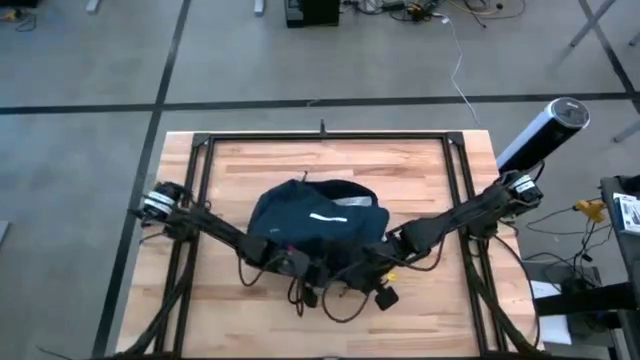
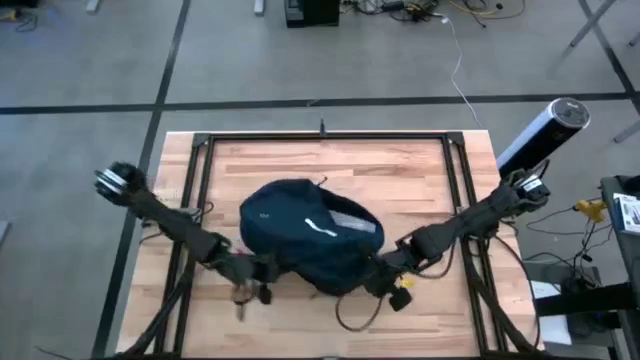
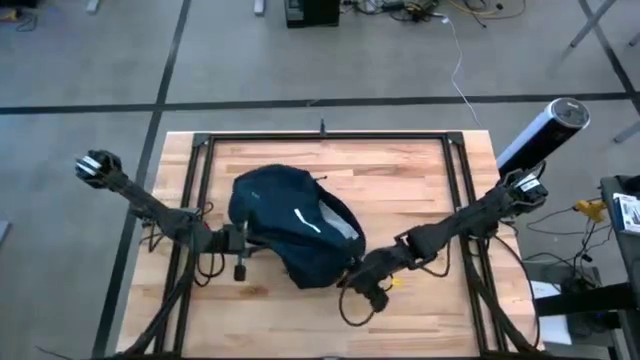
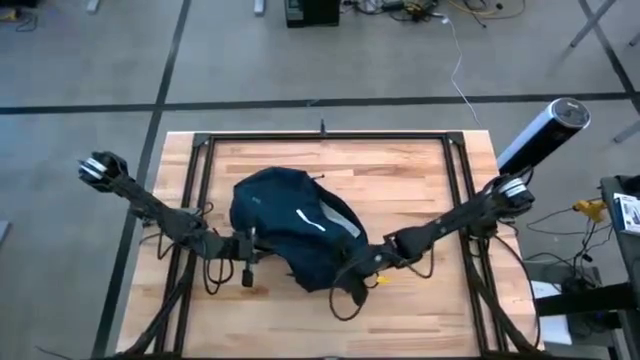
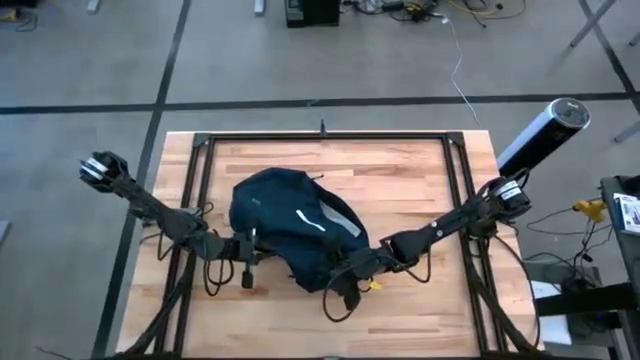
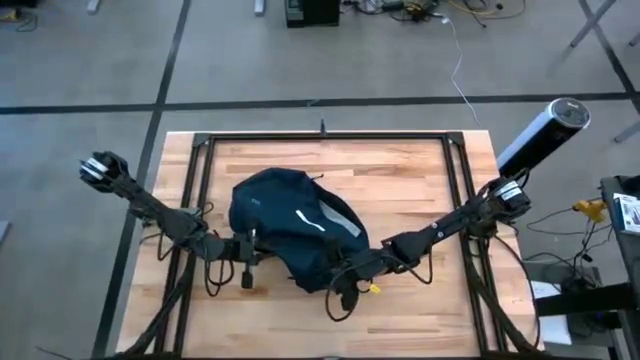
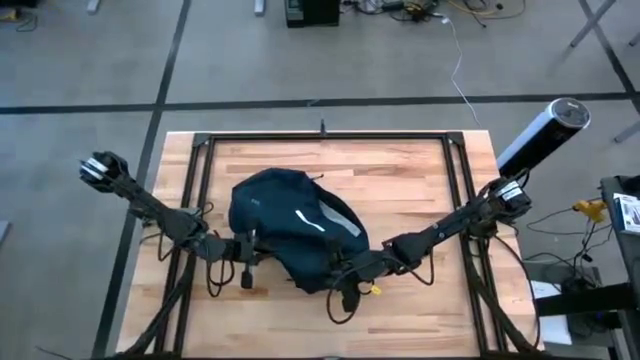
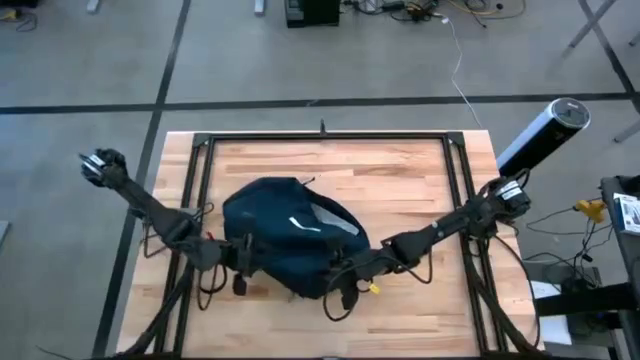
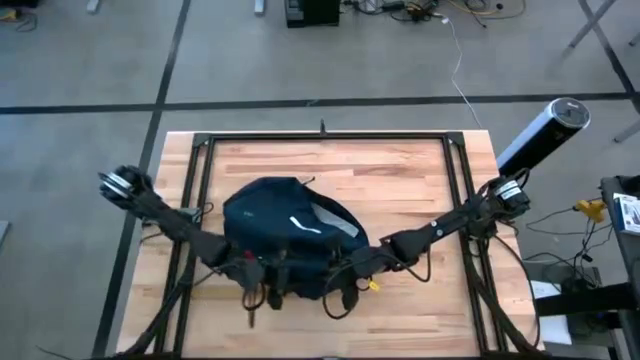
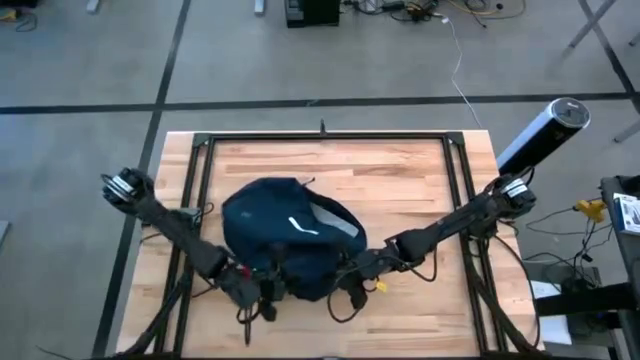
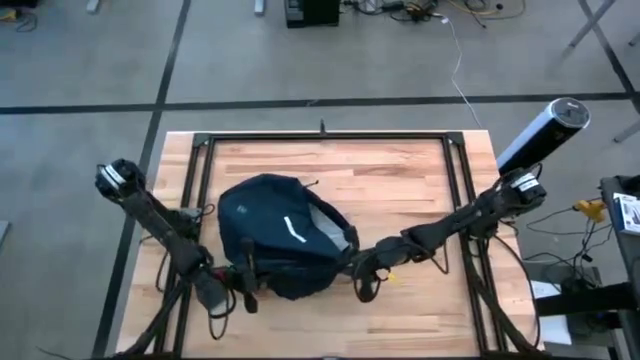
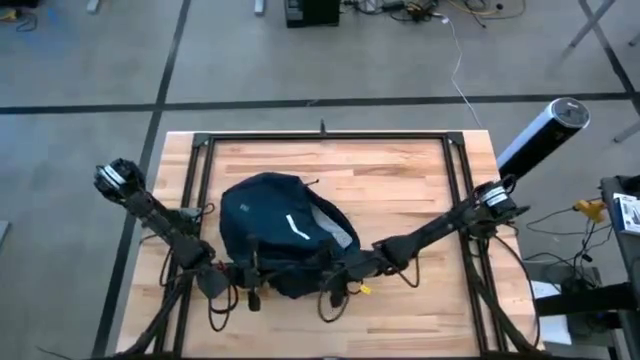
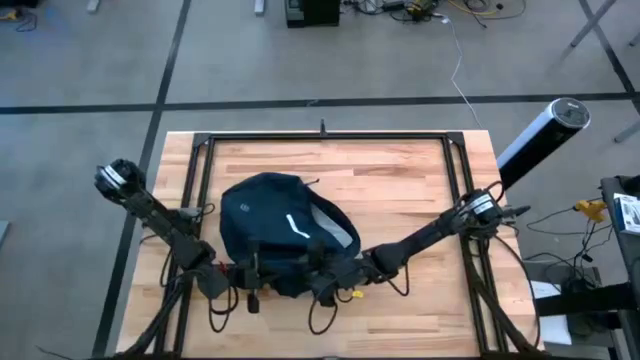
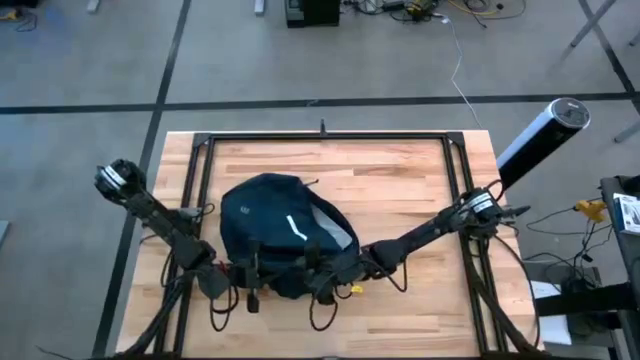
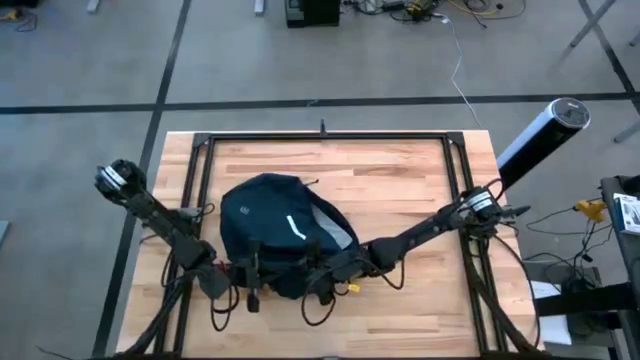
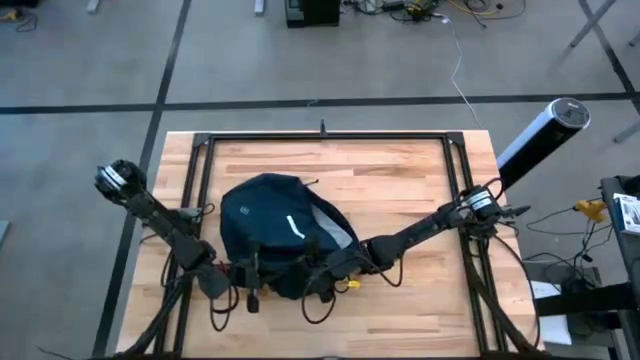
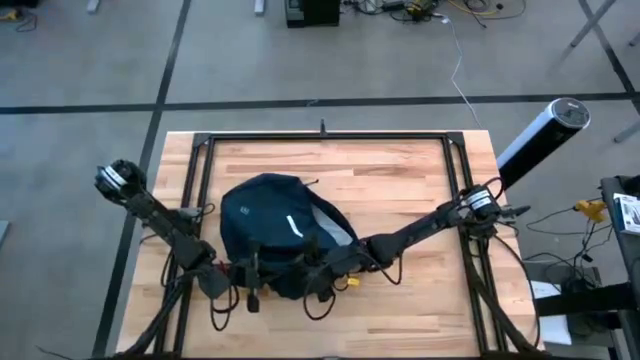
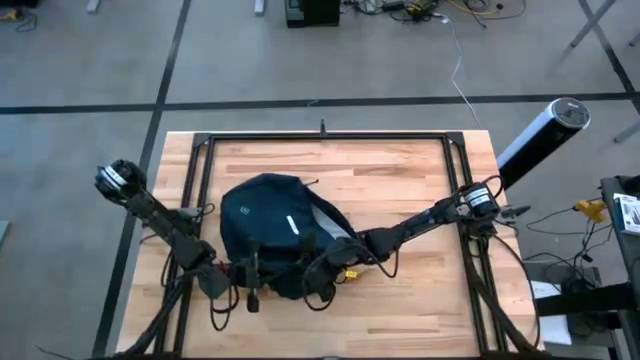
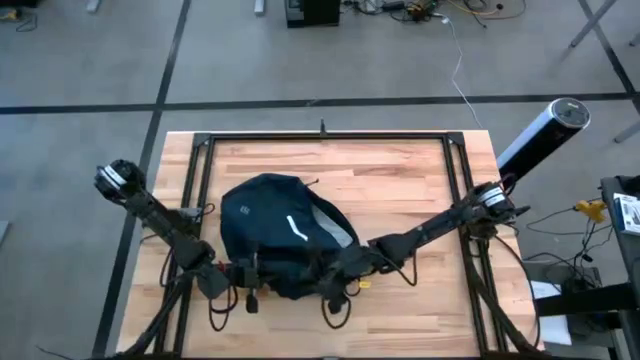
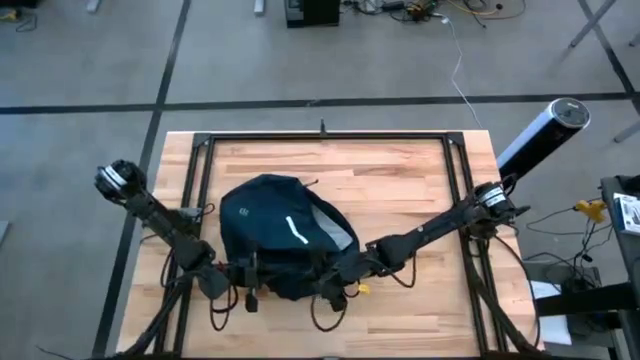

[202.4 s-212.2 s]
Task: Unpack backpack
Close the blue backpack

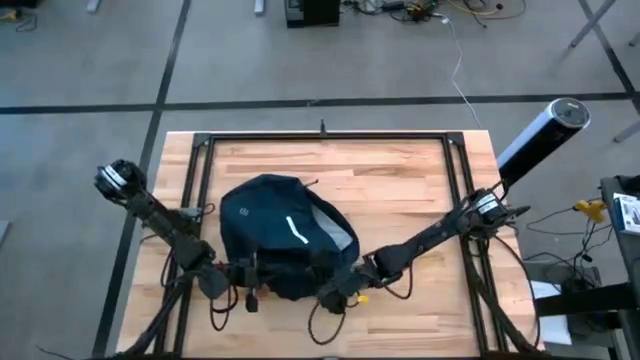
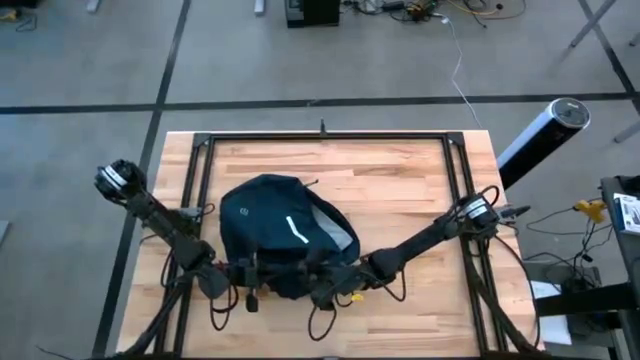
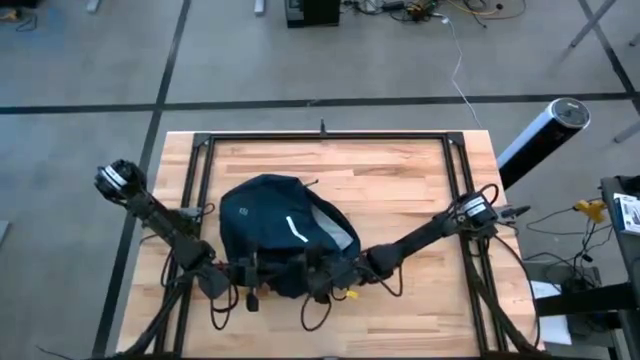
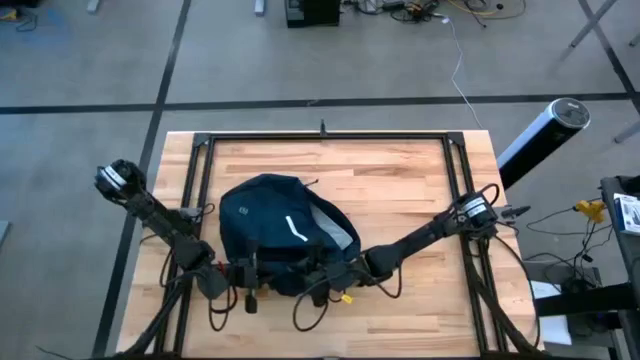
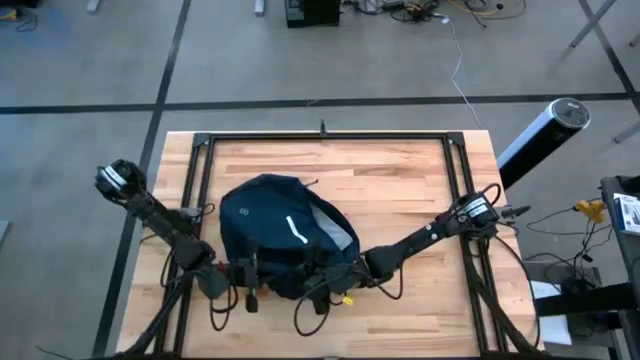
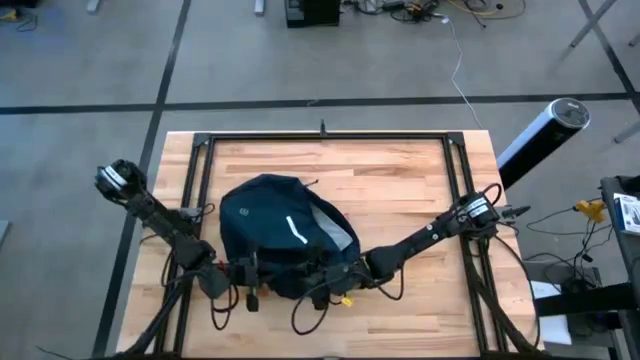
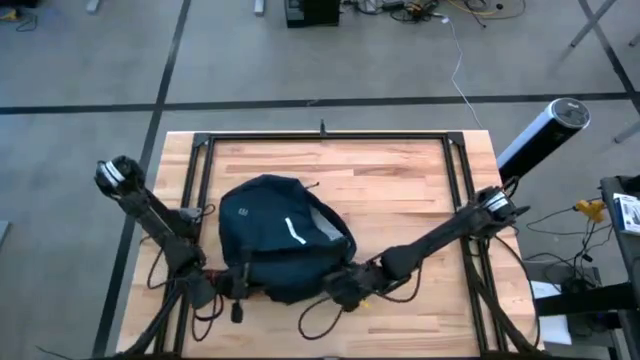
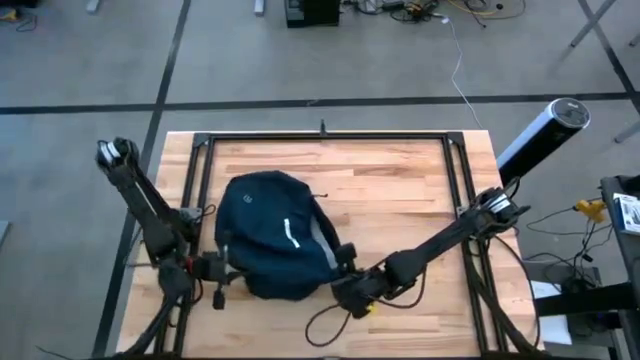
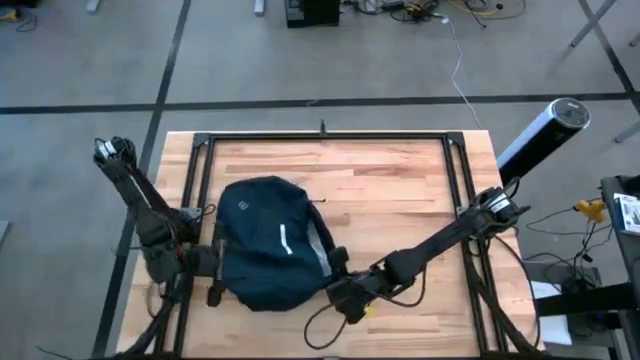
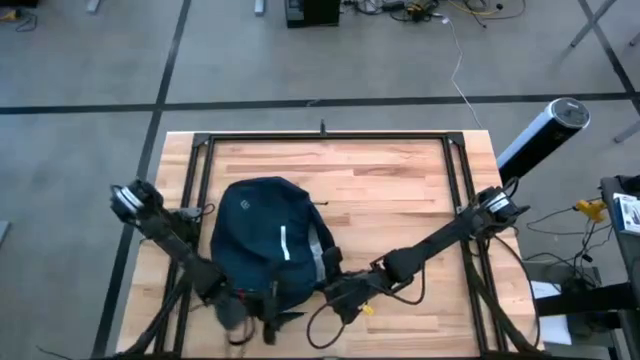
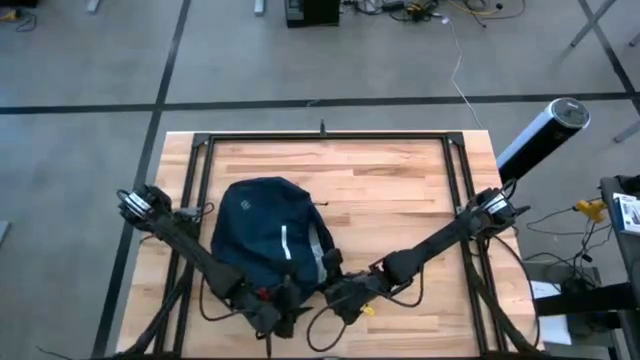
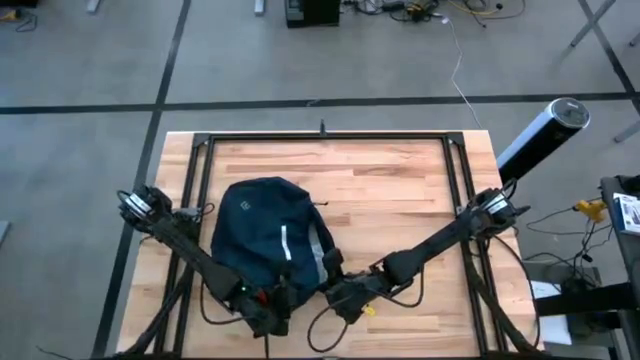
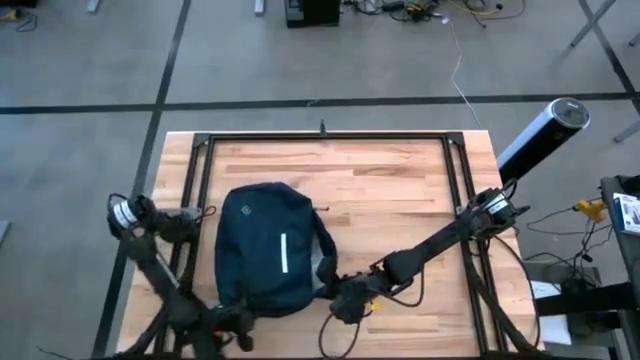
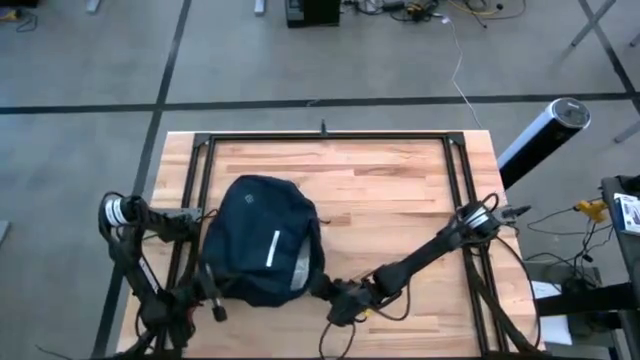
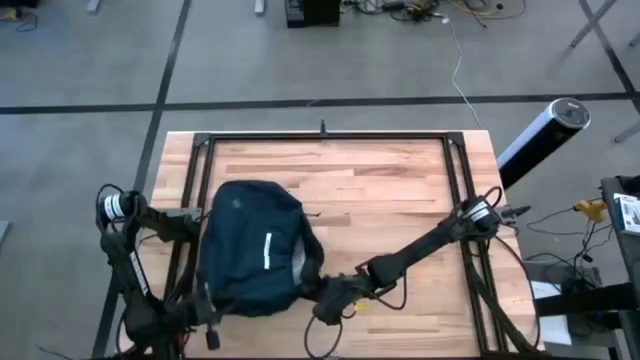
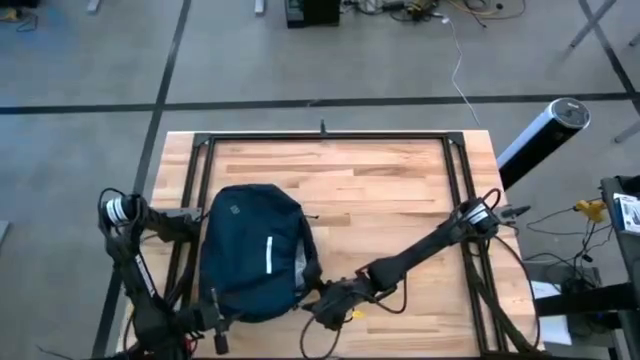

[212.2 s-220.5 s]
Close the blue backpack

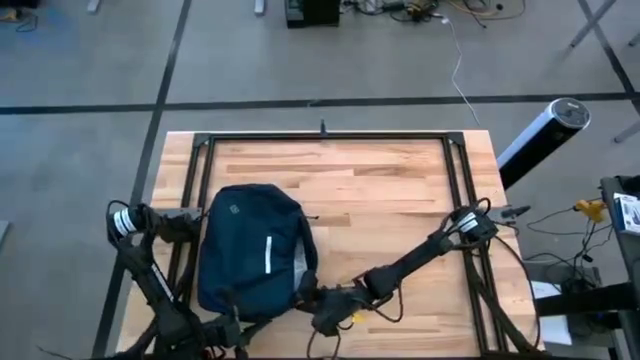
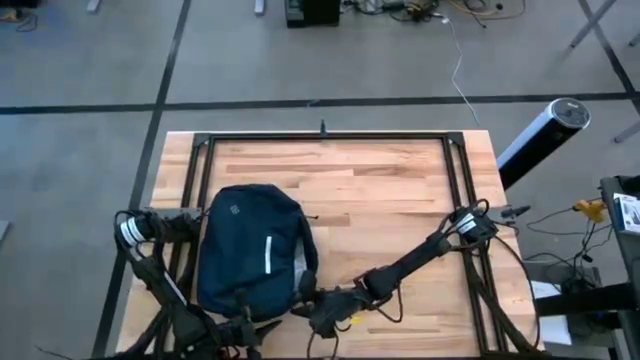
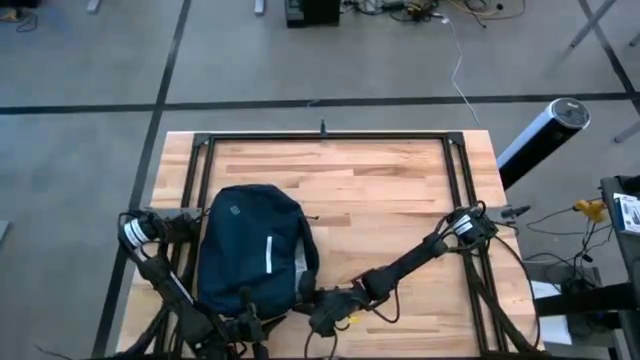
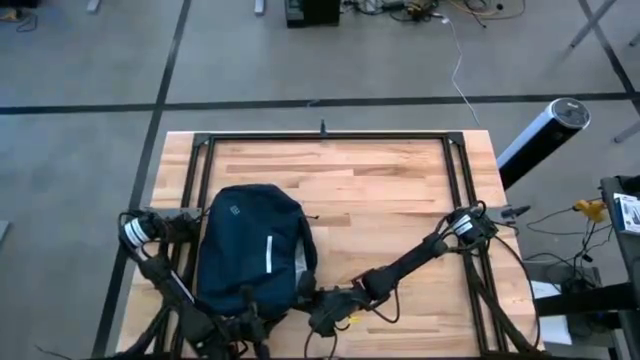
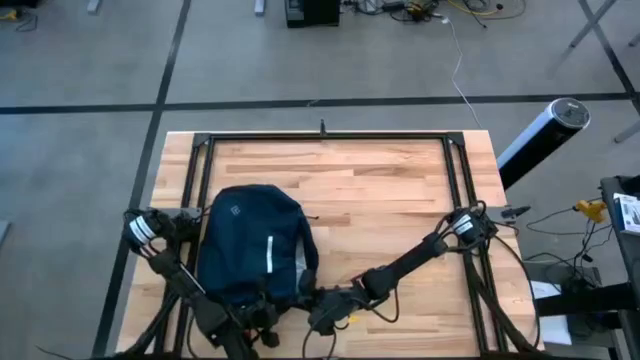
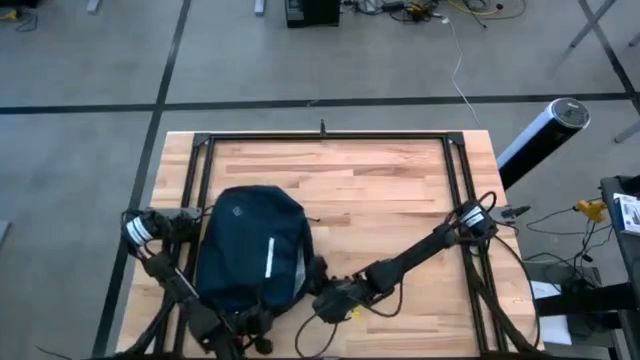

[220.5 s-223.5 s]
Close the blue backpack

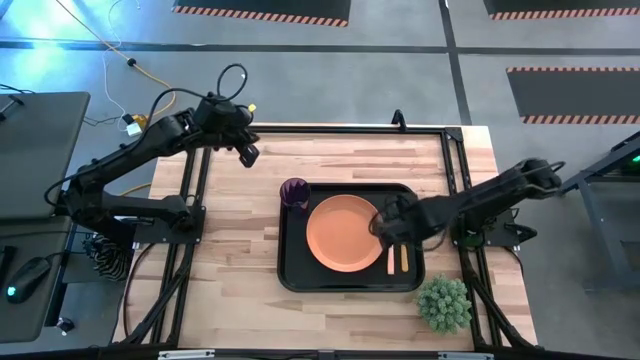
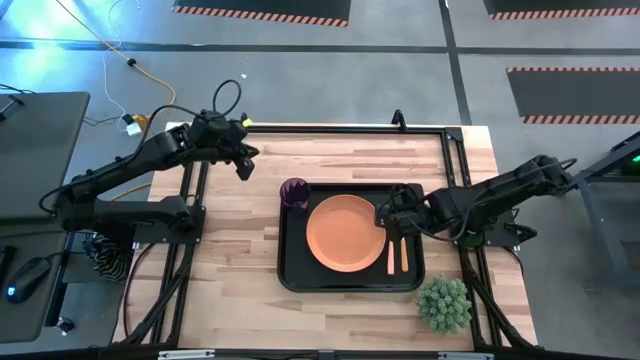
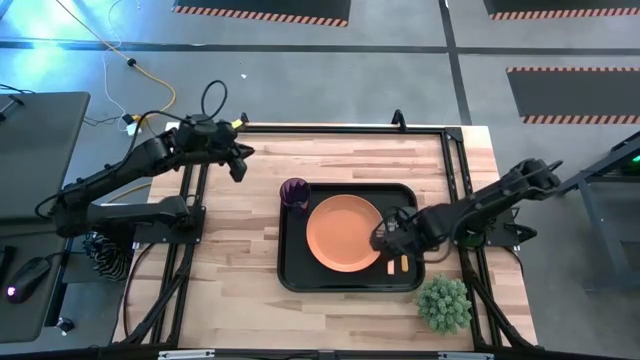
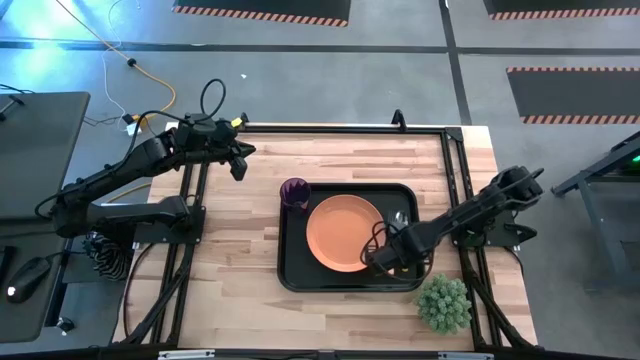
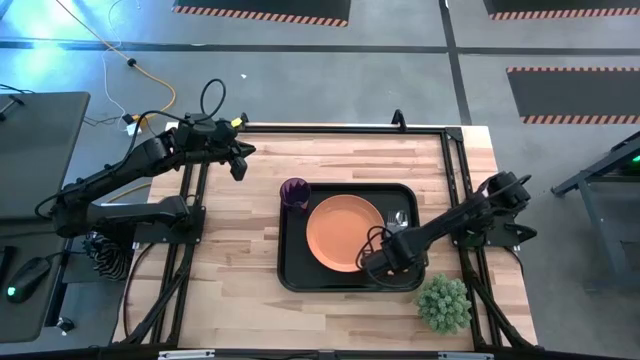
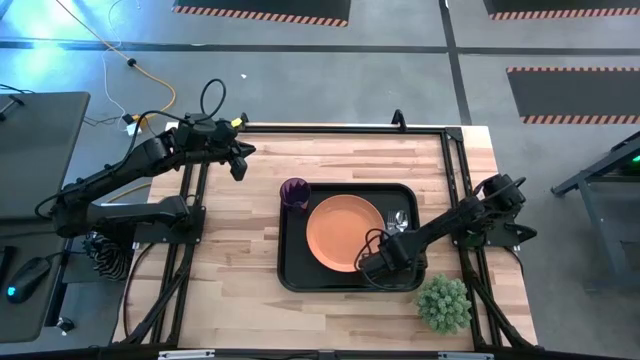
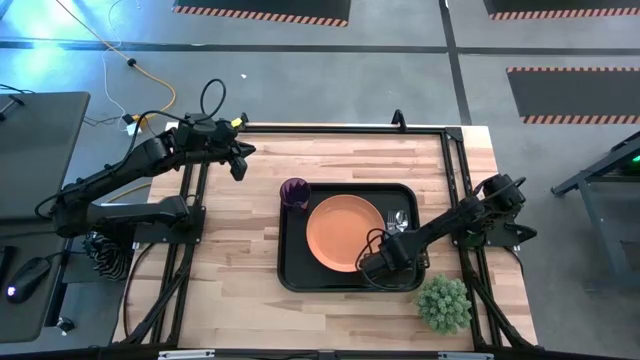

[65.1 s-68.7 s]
Task: Pick and place plate/cup/fork/spoon on tray
Adjust the orange fork
